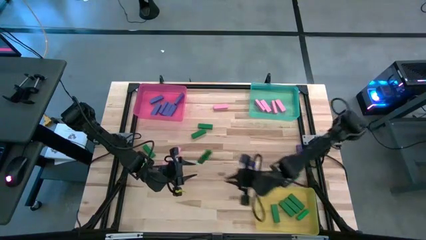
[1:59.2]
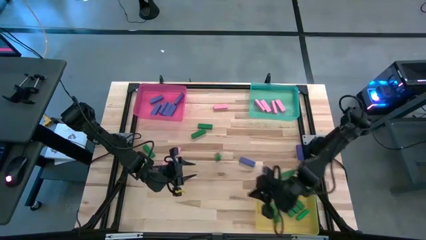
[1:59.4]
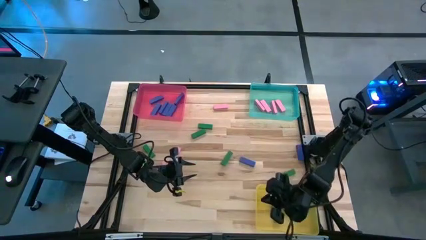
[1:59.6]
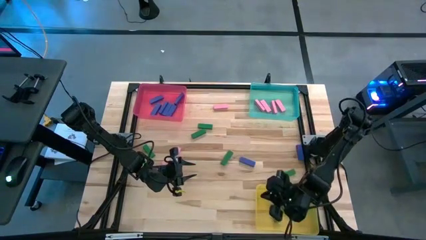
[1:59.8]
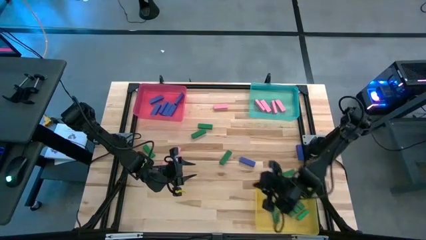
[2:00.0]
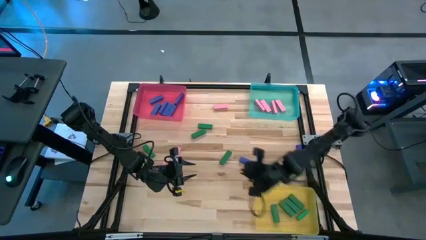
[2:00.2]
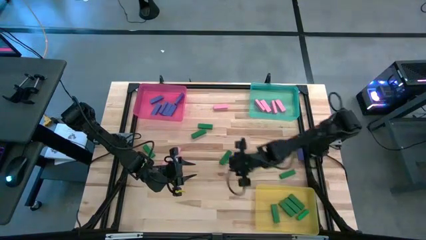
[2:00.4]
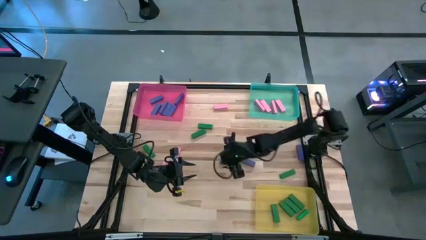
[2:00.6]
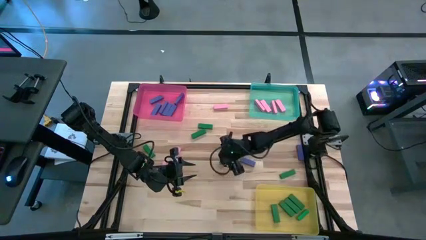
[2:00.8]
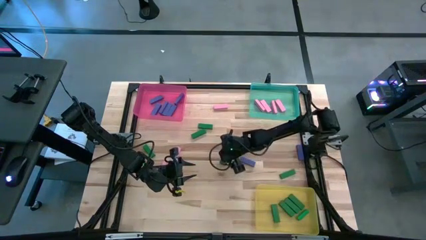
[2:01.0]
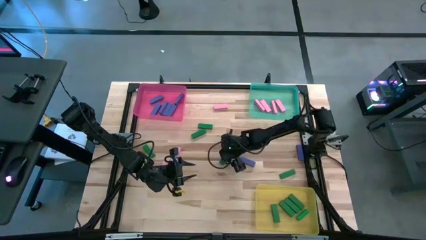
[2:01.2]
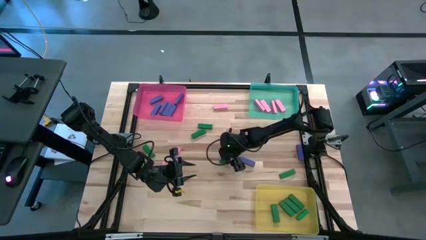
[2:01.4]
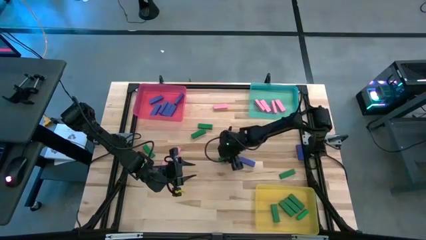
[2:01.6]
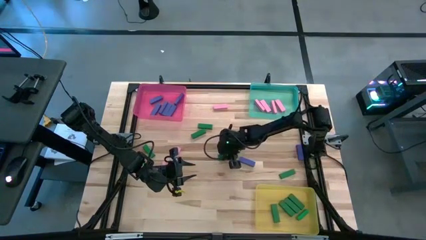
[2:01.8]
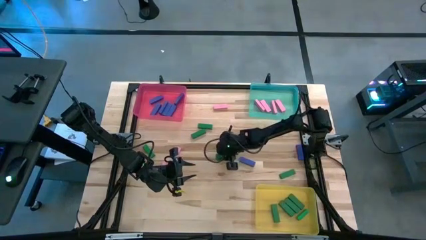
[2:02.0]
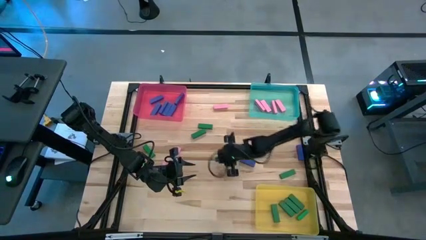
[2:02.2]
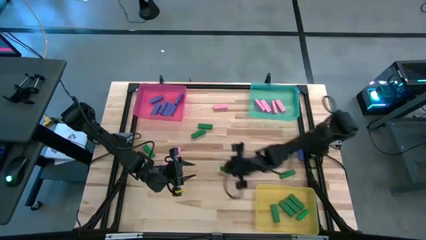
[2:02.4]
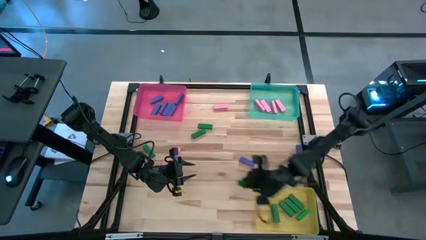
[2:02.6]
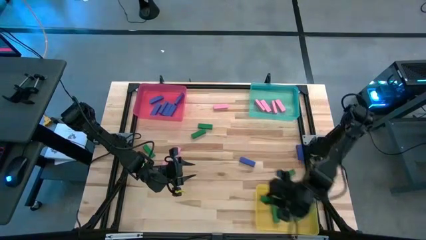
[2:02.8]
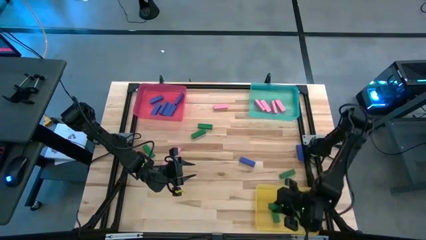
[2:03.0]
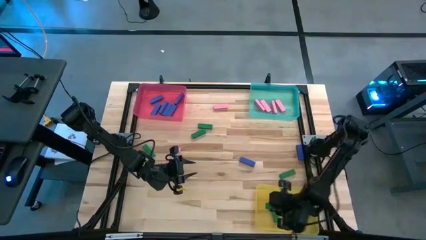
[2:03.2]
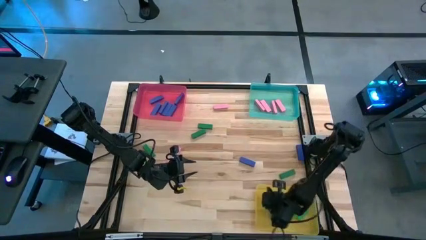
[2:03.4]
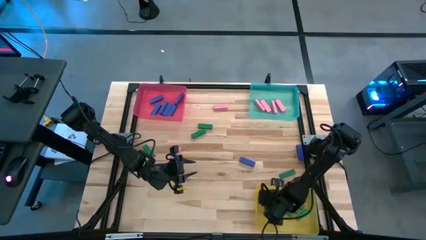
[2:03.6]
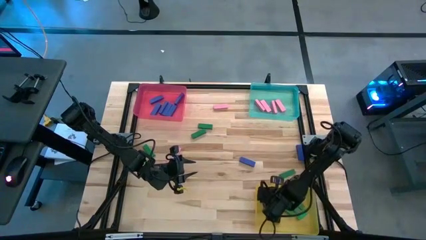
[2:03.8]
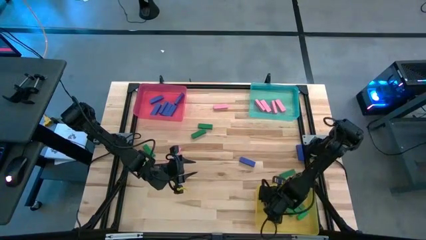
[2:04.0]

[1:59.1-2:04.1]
Task: Sort blocks
Put the green block into the yellow bin

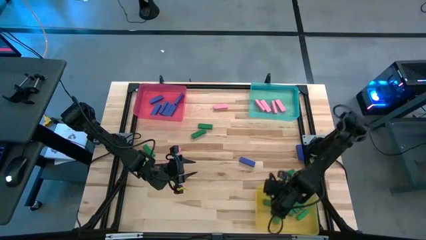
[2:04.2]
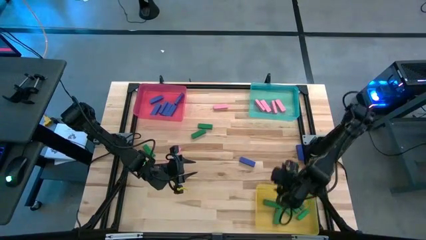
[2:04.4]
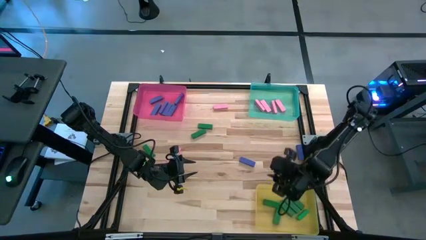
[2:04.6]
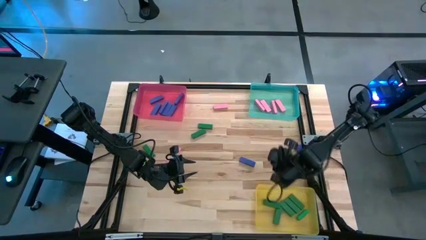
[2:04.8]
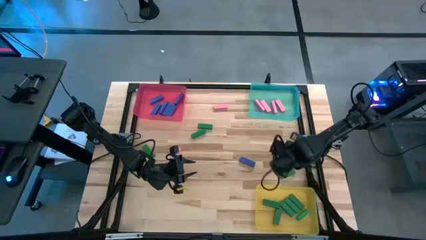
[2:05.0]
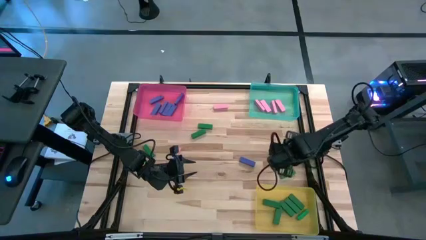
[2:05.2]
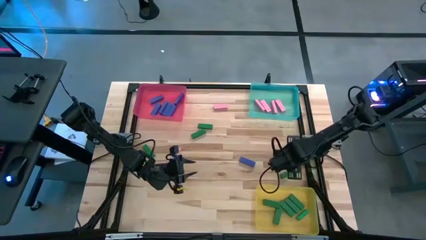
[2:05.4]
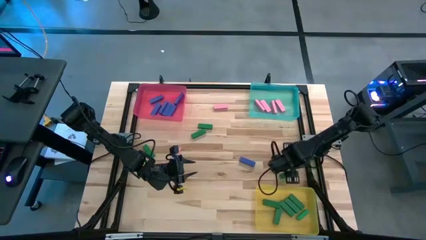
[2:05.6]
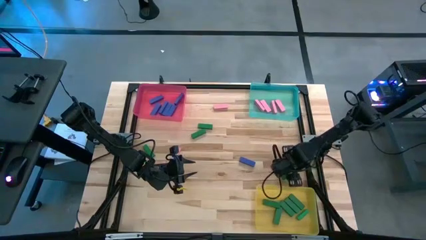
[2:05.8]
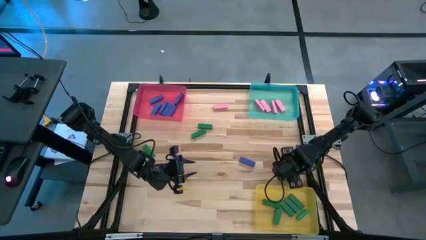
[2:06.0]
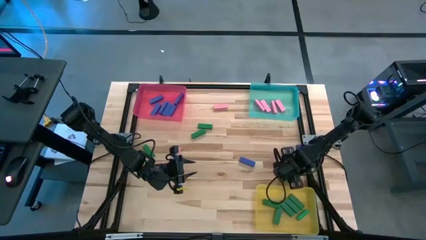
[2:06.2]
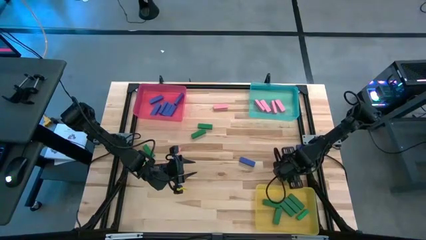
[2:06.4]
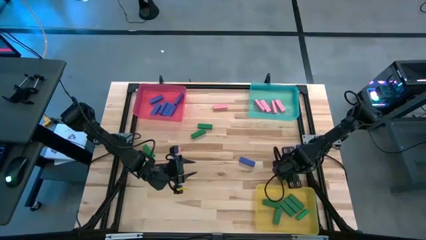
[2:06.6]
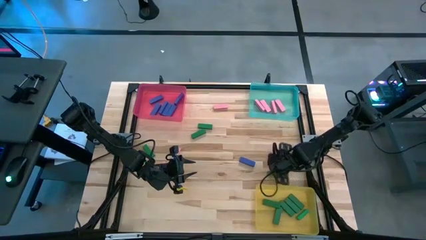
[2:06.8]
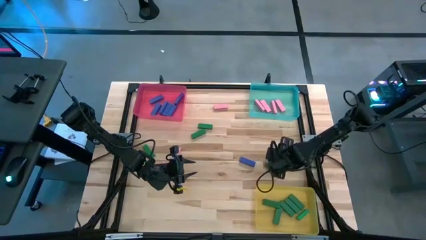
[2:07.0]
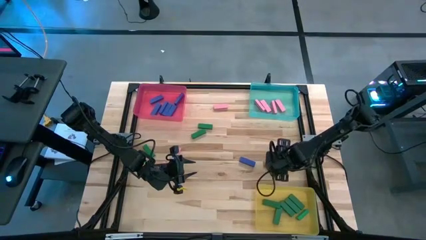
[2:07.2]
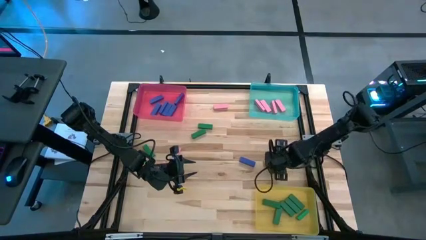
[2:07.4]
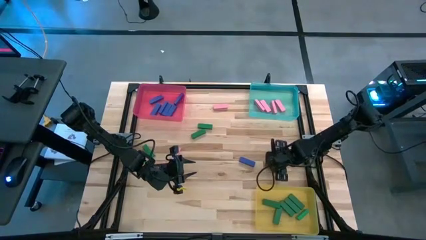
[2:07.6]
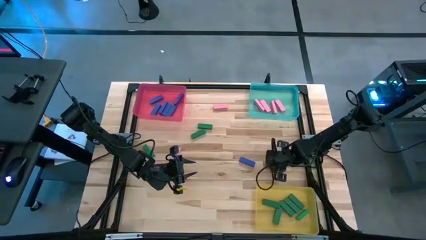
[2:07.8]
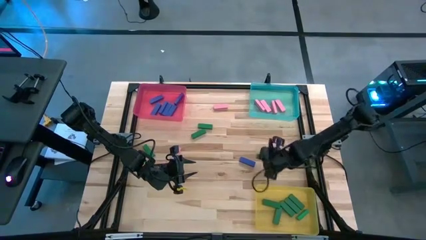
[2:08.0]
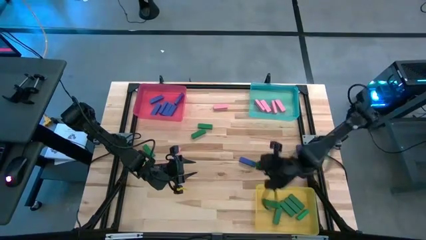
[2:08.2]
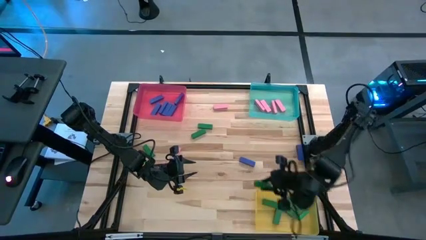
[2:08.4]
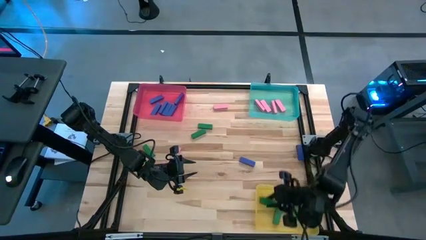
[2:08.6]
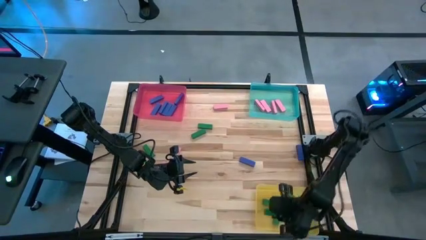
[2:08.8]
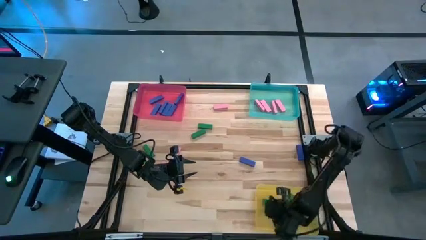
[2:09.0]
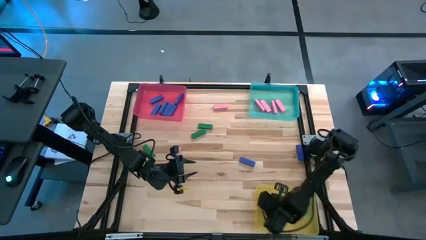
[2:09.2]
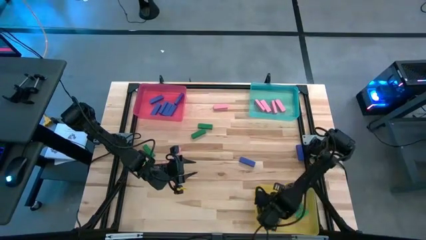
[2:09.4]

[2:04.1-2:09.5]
Put the green block into the yellow bin

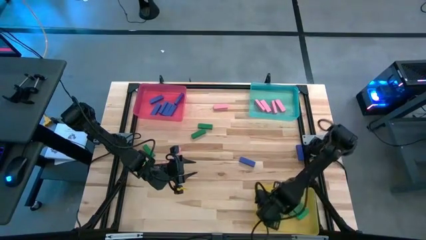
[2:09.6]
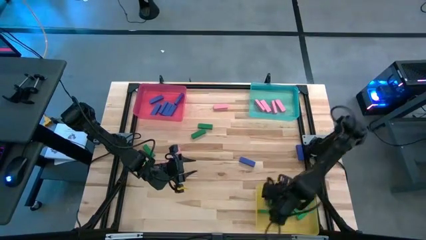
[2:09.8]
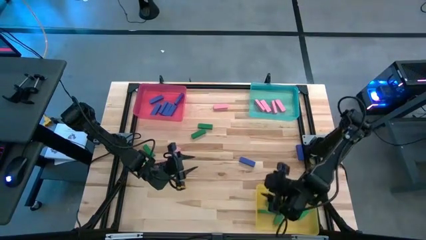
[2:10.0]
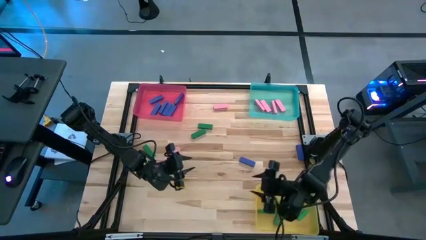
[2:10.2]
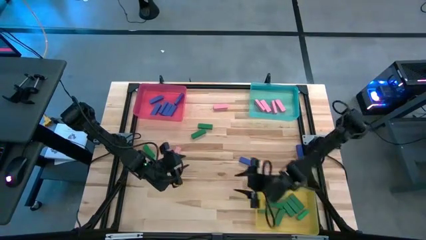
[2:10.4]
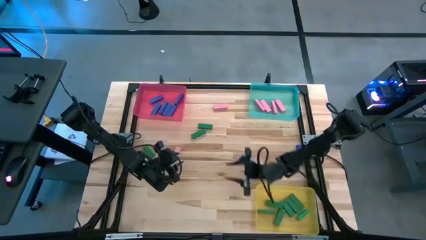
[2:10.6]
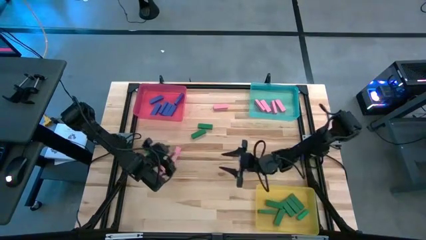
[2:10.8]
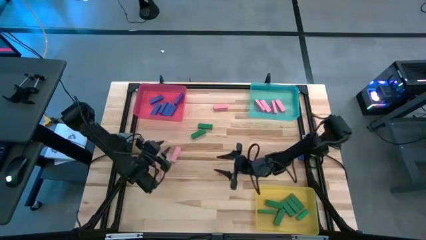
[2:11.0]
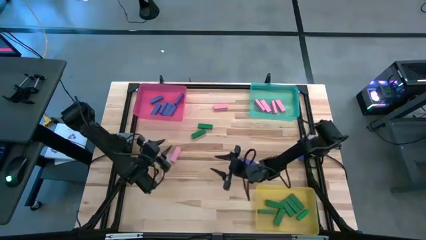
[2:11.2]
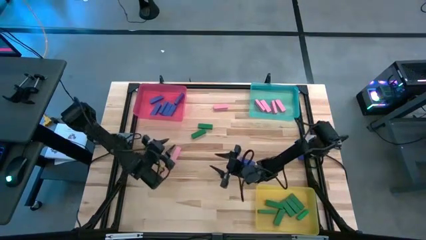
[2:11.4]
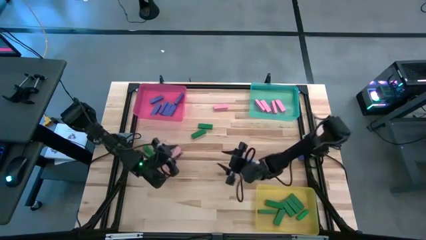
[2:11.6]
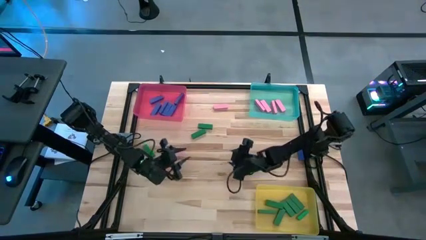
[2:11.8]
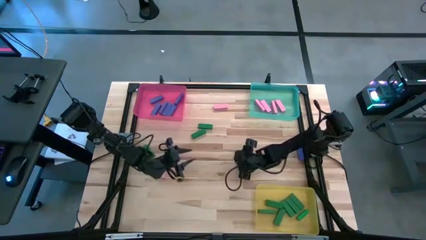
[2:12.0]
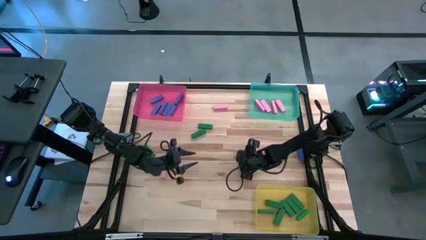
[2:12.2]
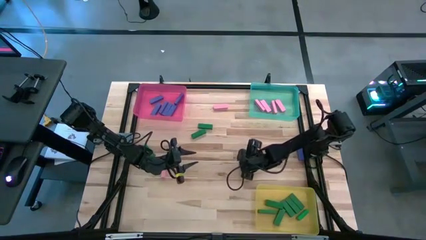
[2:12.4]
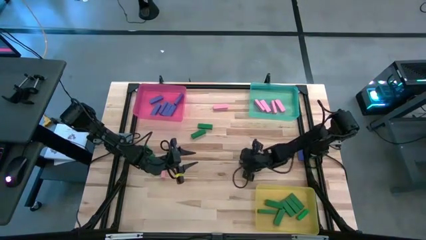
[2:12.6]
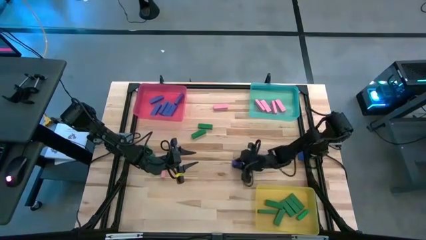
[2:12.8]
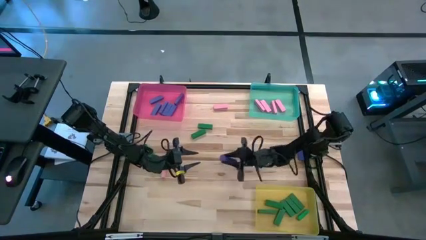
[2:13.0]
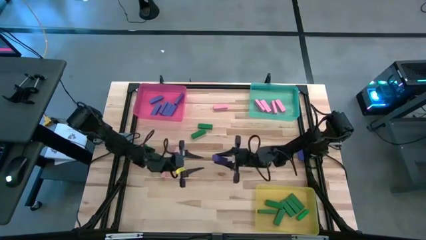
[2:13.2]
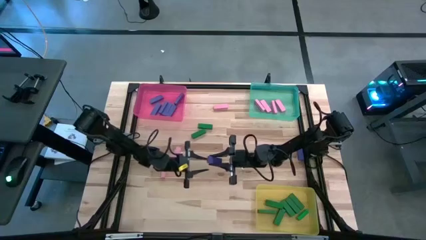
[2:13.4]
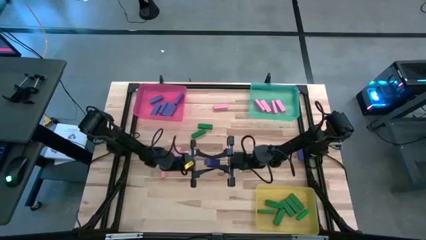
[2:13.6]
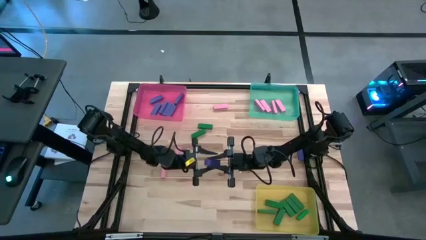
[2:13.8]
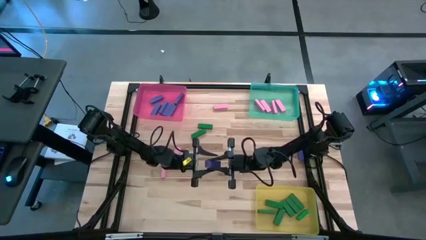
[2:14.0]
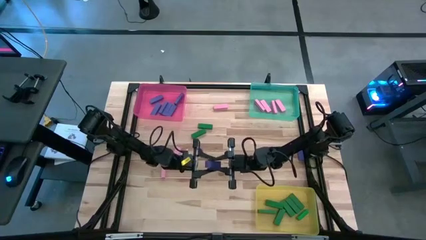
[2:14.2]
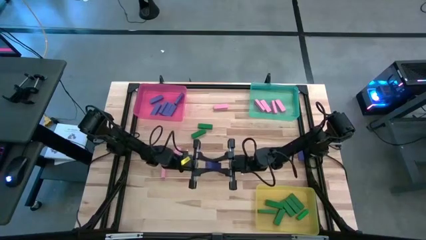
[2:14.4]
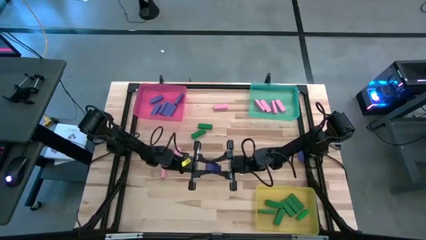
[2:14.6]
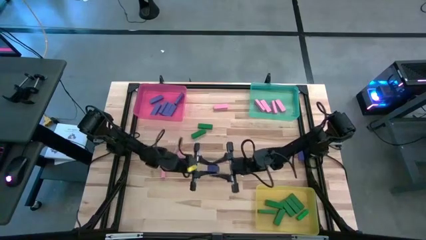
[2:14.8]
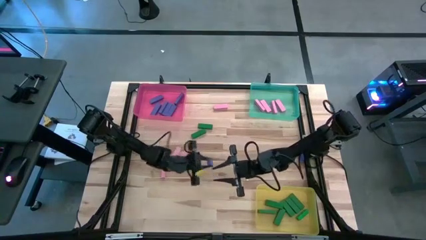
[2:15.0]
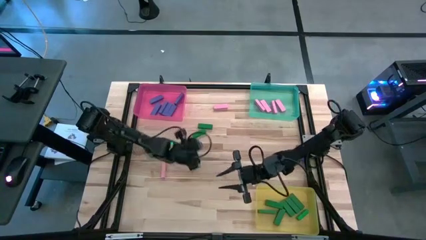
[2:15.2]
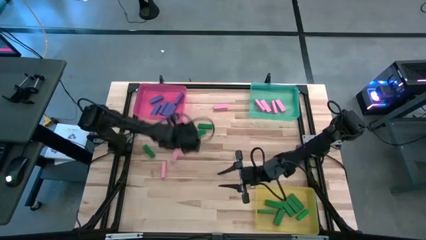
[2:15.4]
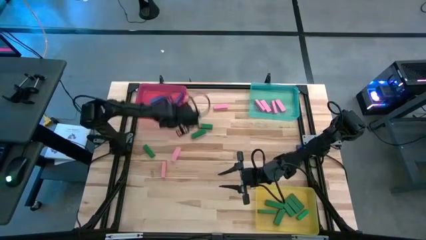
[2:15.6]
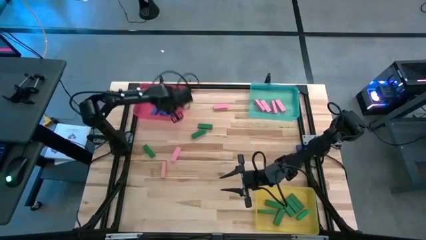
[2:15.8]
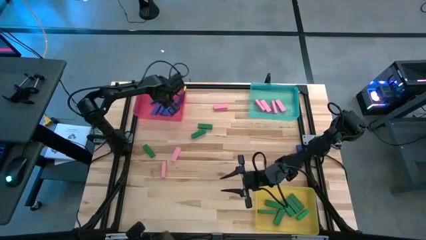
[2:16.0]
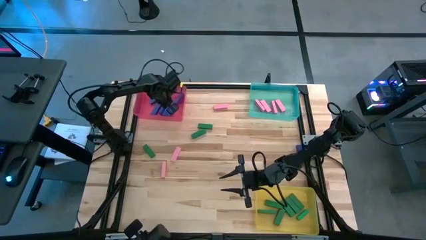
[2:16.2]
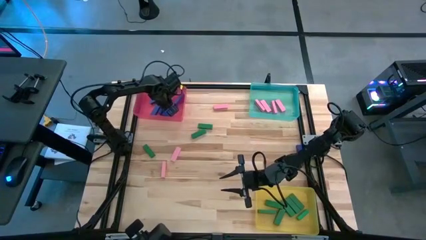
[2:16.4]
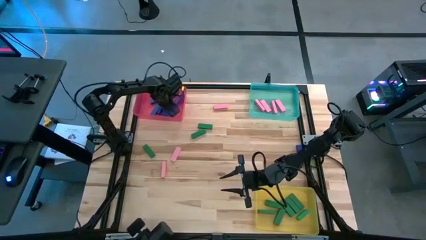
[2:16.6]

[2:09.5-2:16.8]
Put the blue block into the red bin
